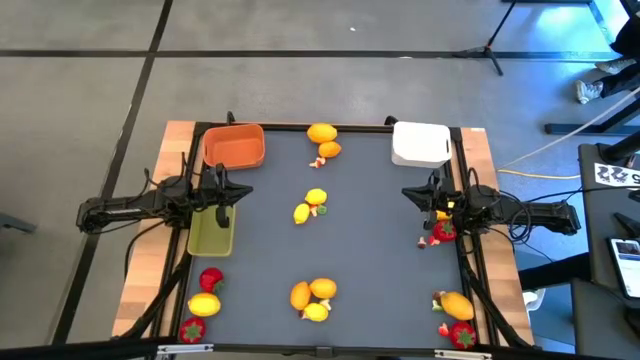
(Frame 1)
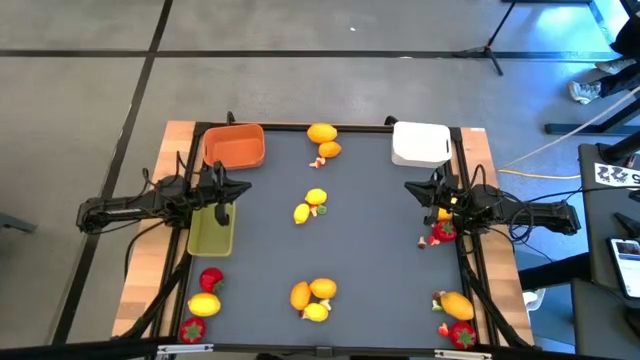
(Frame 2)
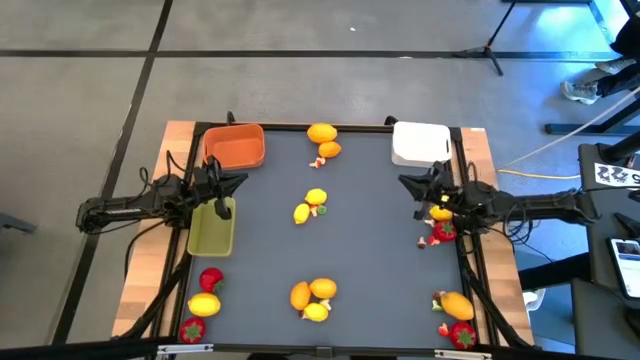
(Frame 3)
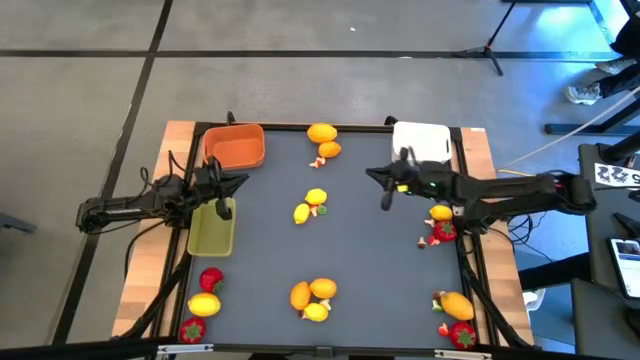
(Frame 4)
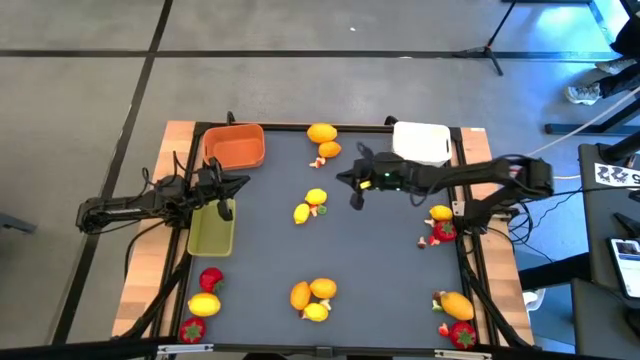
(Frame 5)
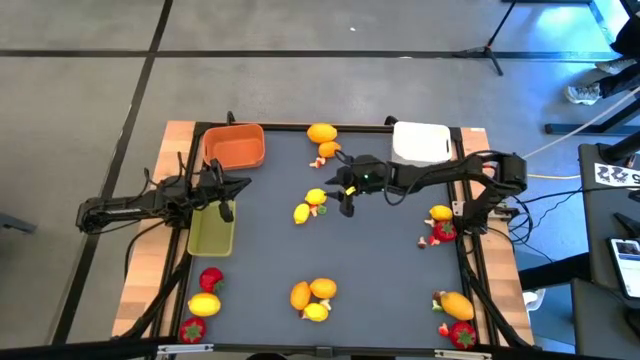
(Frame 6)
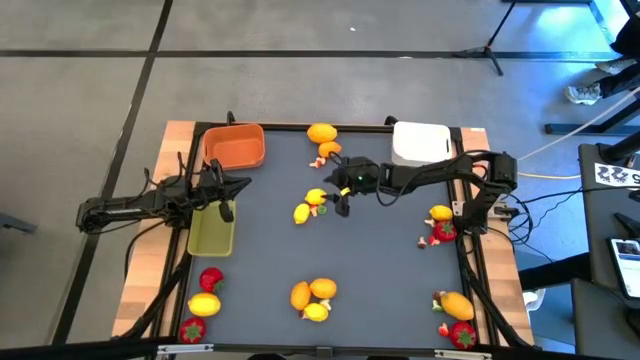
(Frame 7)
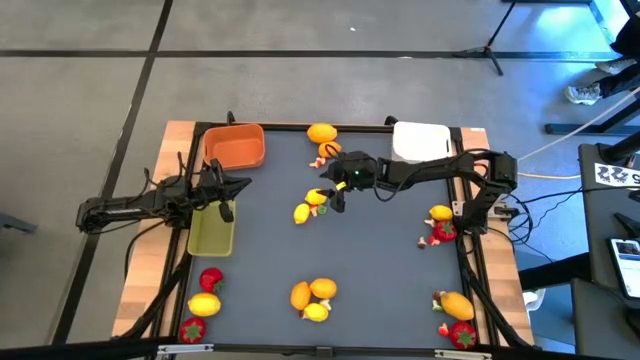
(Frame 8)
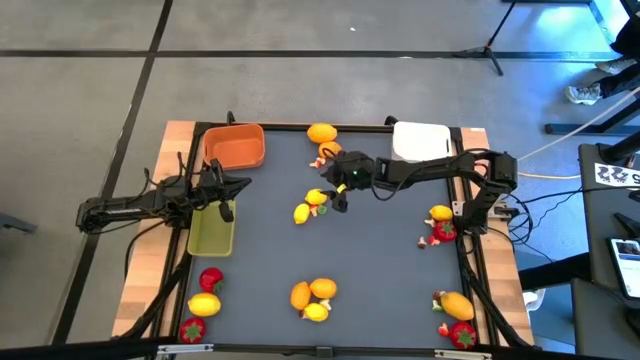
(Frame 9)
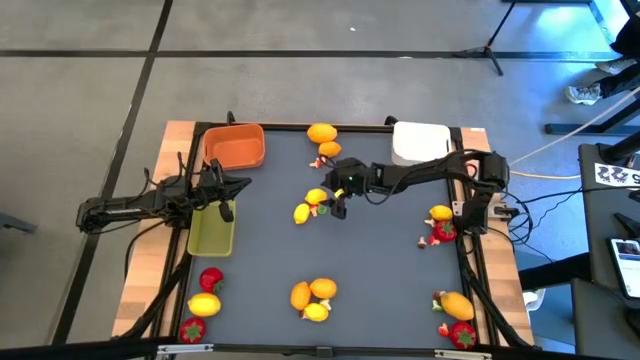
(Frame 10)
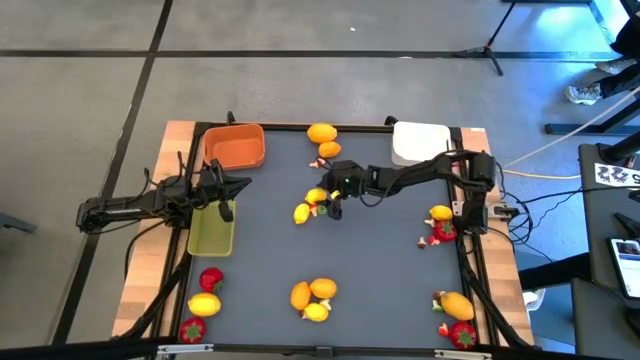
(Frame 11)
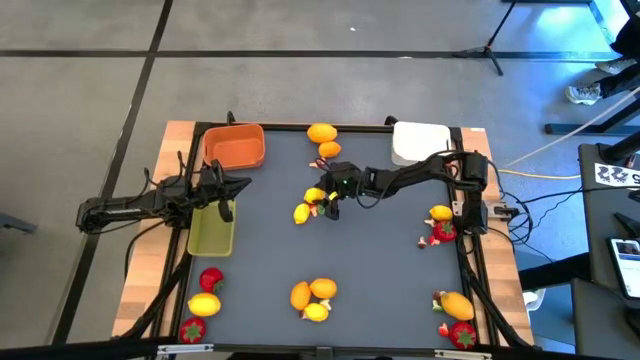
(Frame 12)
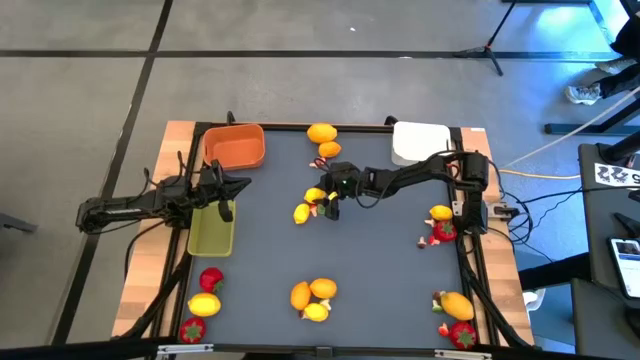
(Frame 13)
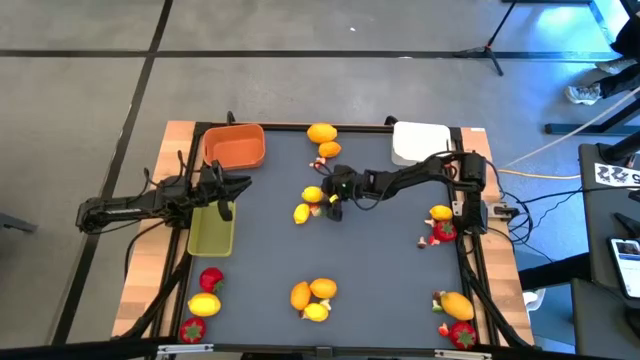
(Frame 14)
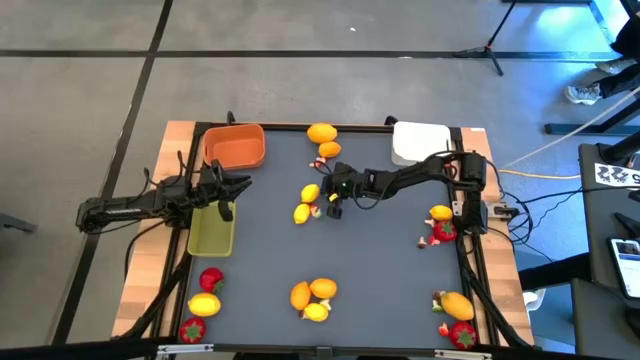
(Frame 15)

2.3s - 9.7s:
Task: Sort produce into baskets
Put the lemon into the white bin

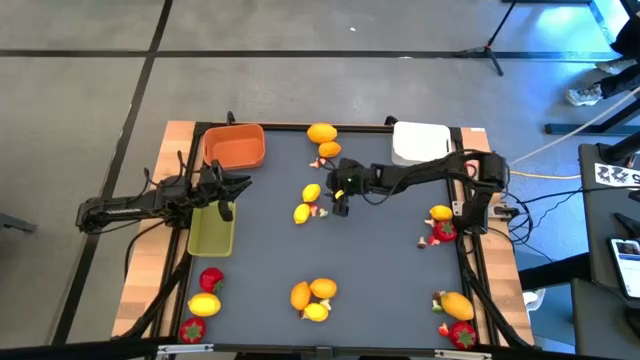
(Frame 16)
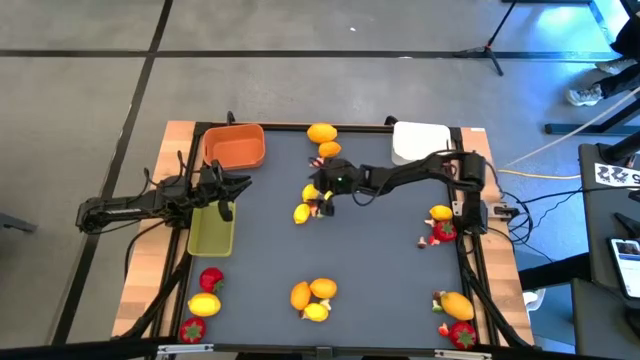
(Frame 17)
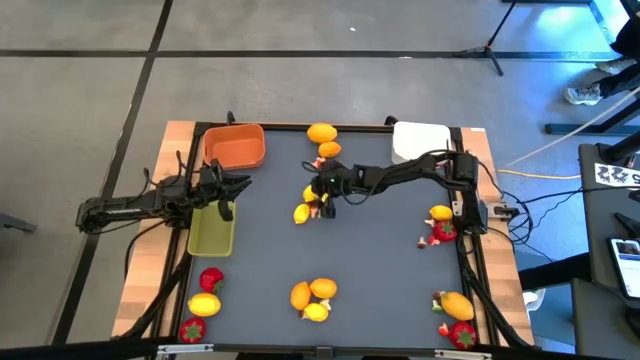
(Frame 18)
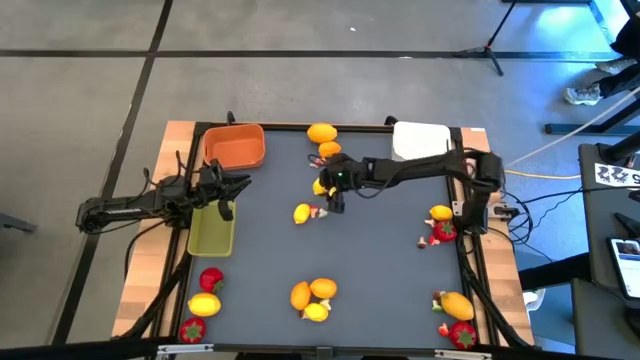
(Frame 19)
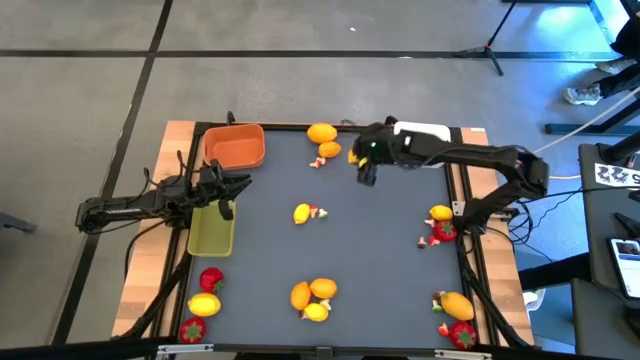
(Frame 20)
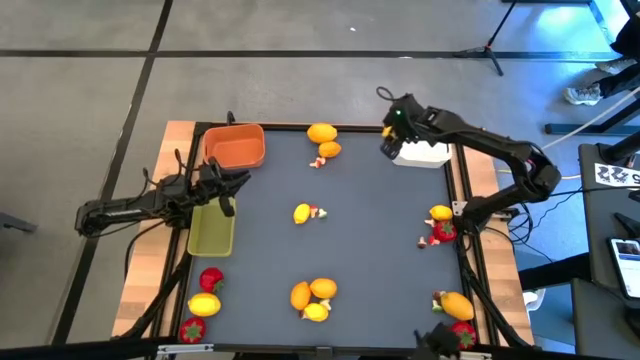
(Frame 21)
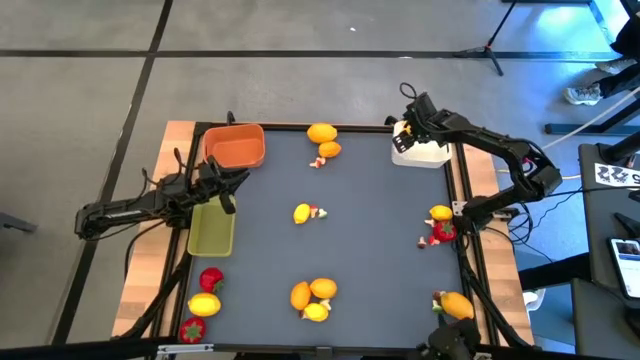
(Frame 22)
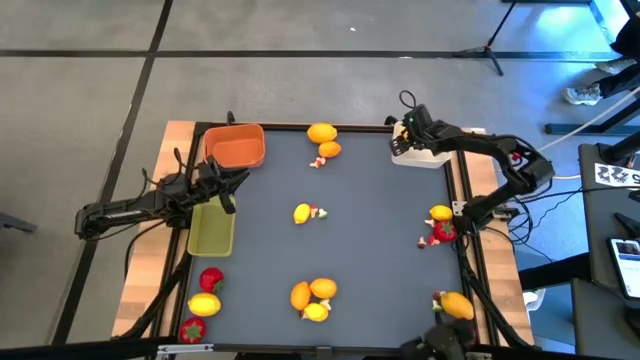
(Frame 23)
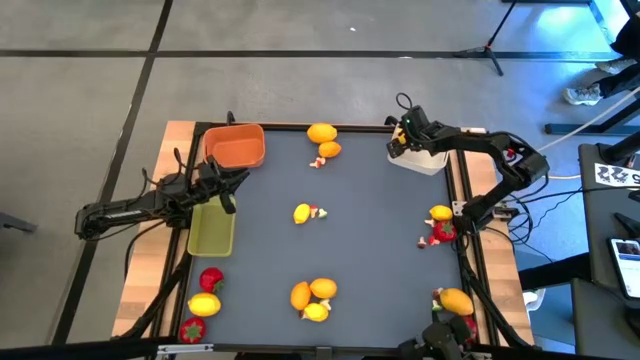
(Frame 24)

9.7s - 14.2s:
Put the lemon into the white bin

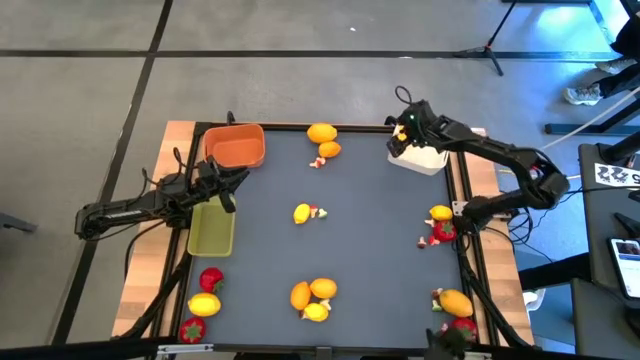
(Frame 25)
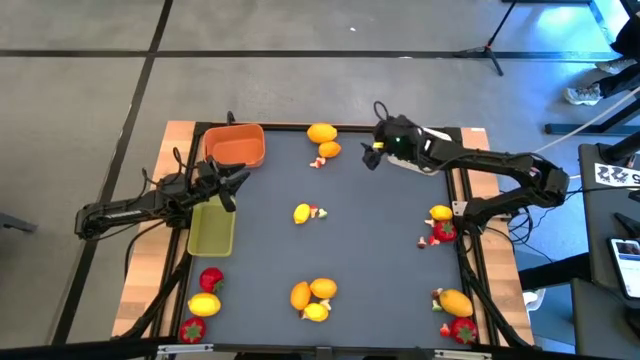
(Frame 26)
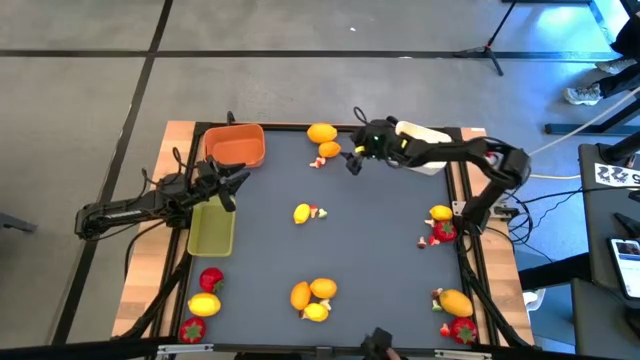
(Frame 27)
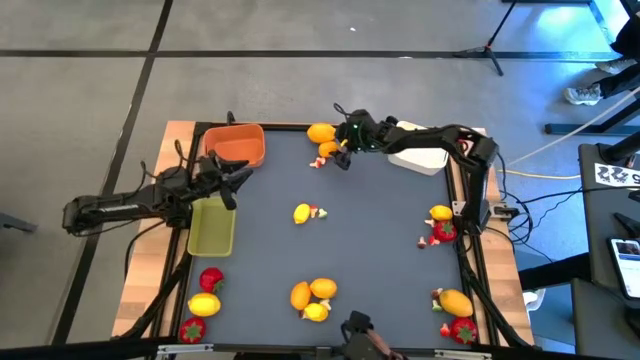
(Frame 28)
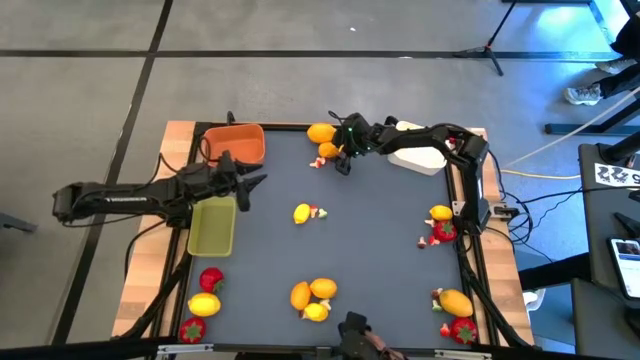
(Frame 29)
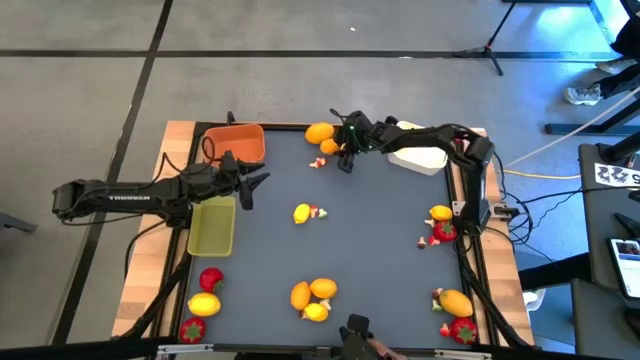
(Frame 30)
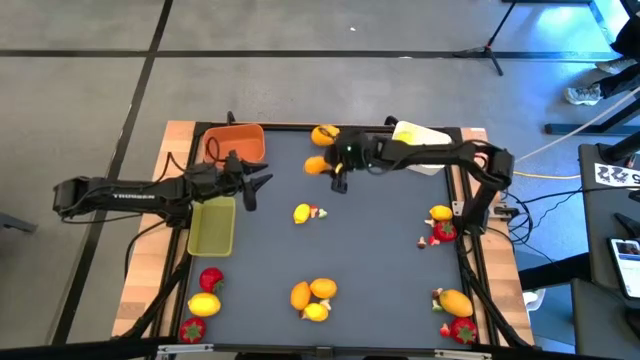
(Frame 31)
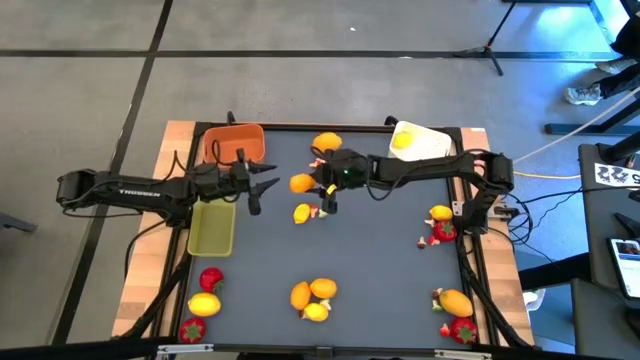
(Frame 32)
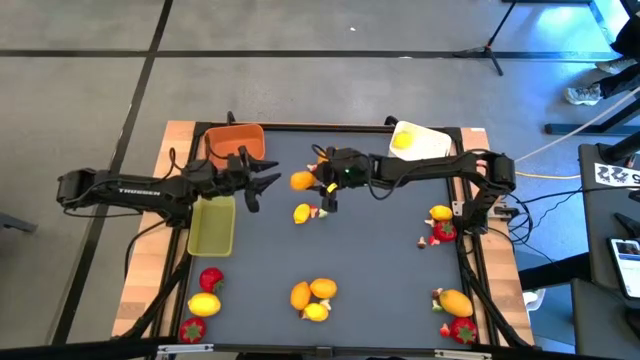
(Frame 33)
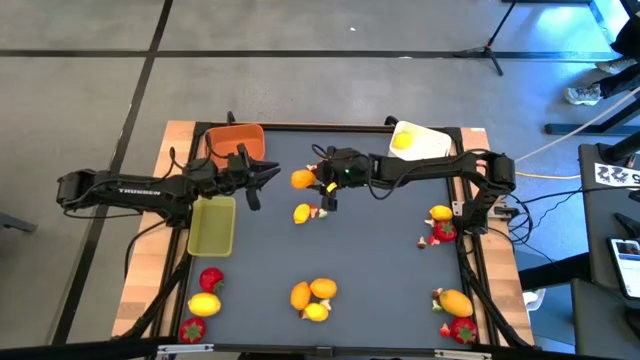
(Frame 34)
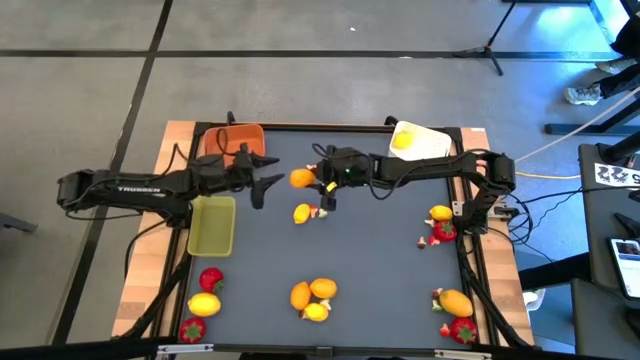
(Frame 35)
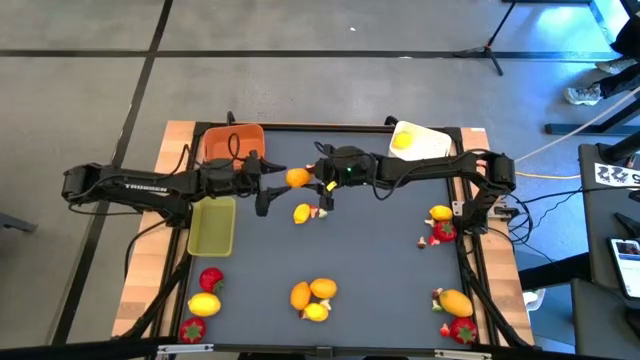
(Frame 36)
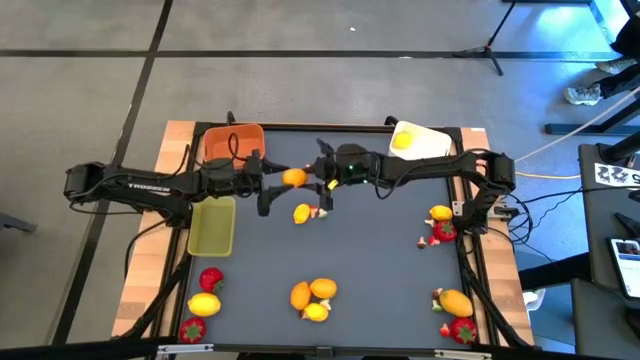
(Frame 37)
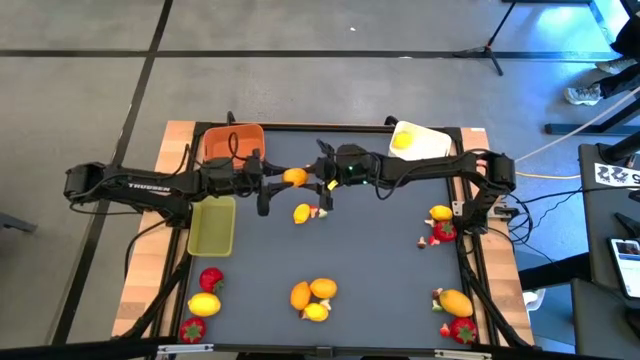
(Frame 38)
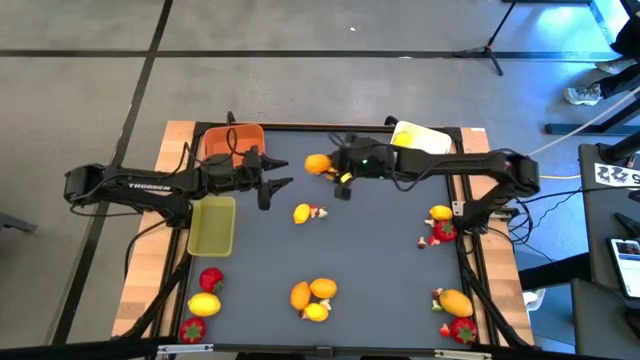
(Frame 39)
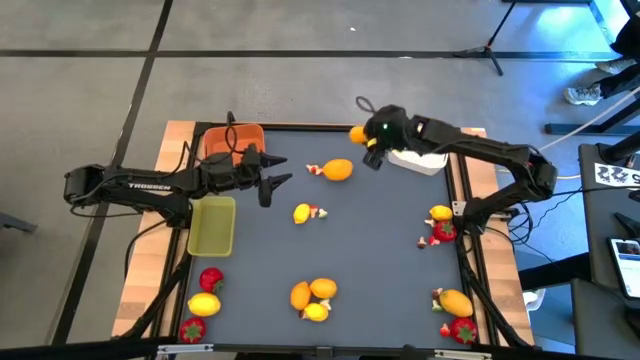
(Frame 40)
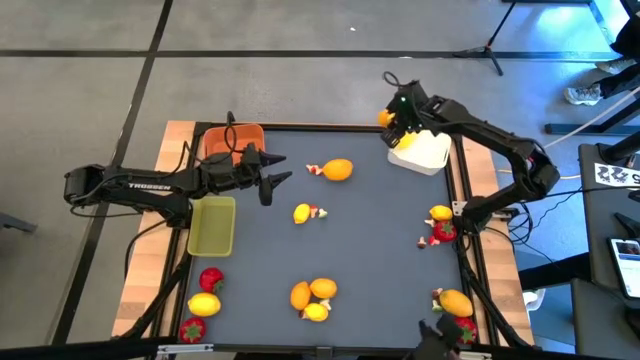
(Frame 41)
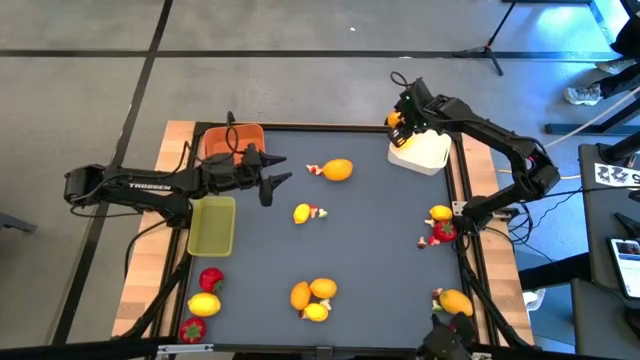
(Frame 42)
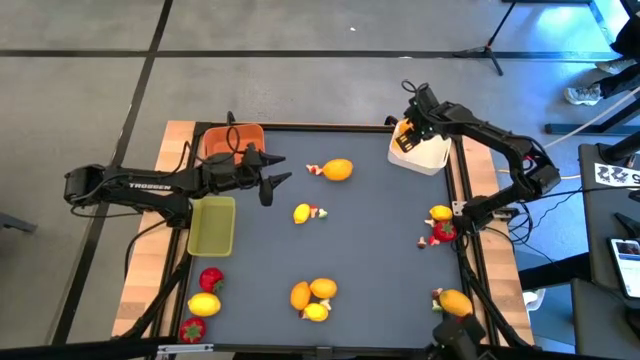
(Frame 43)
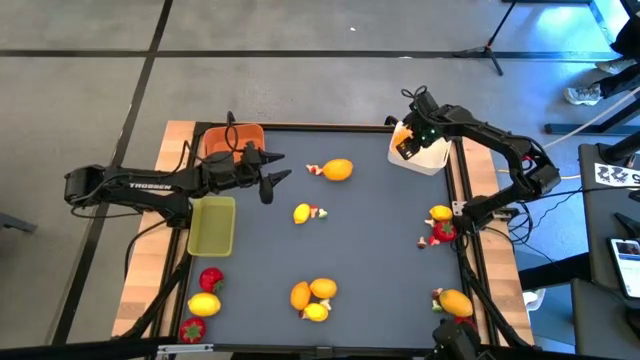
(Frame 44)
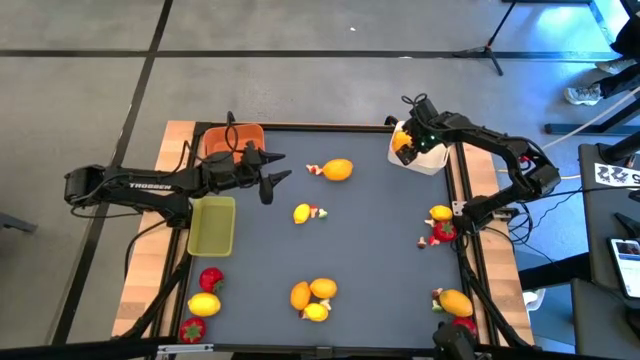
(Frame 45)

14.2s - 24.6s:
Put the lemon into the white bin
